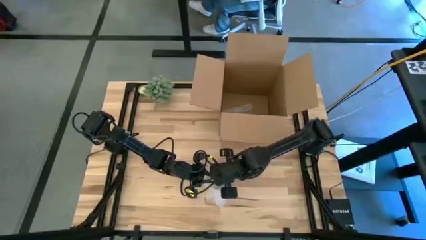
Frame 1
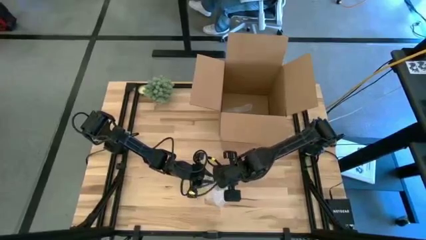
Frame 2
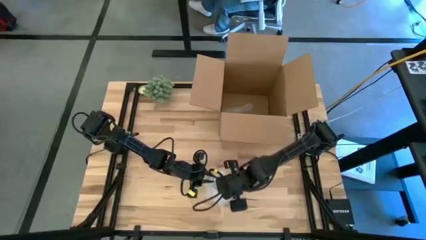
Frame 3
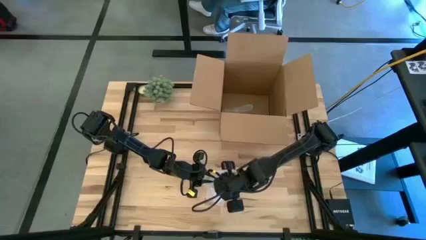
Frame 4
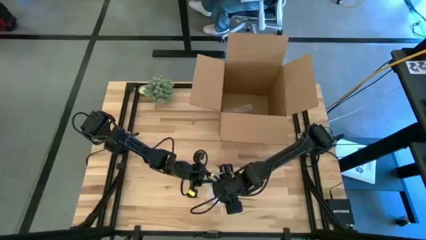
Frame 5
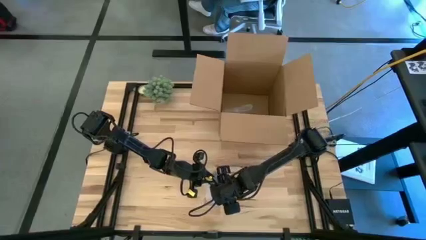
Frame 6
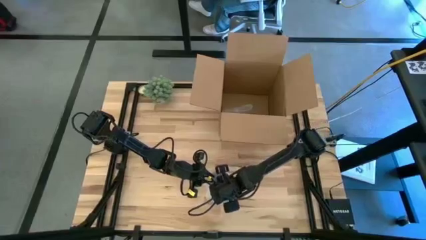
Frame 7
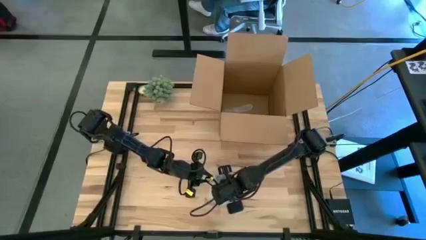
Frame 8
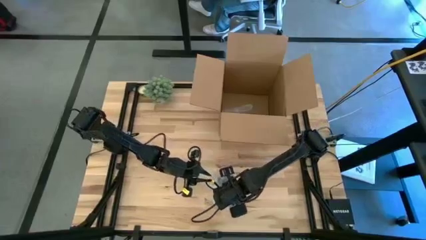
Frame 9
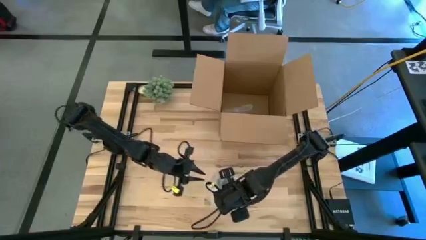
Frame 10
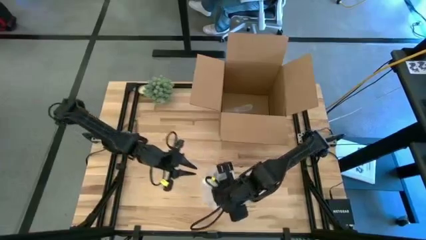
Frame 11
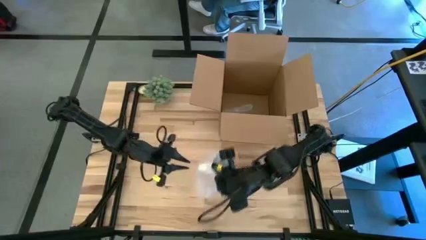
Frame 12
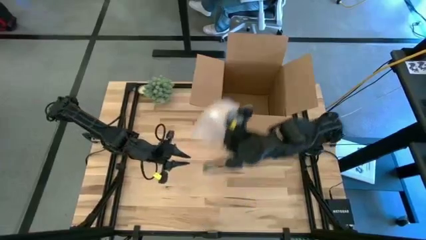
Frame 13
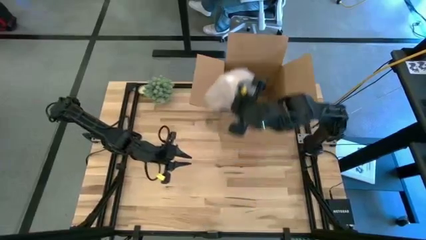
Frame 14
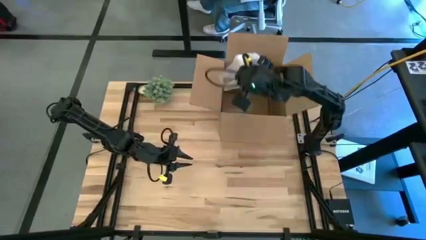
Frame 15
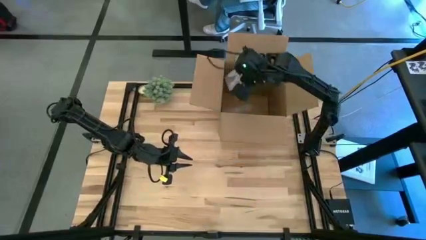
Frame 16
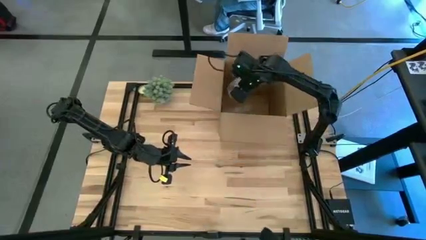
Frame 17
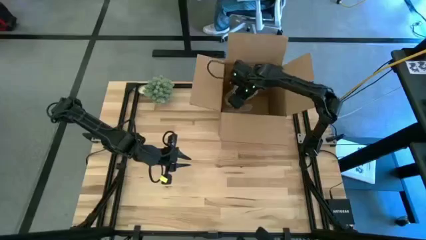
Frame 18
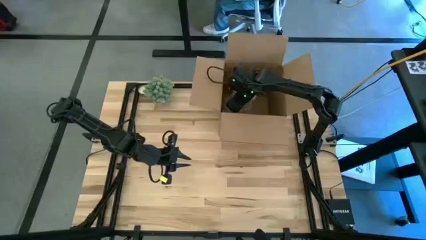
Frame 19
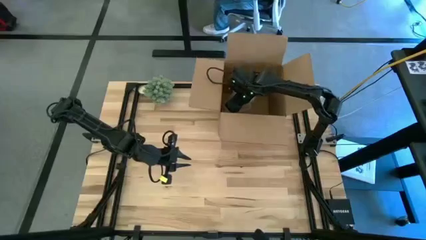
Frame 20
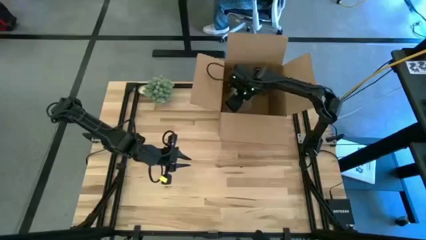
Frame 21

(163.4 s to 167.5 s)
Task: wrap mug
Put the wrapped orange patterned mug into the cardboard box

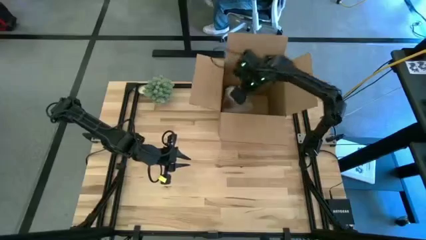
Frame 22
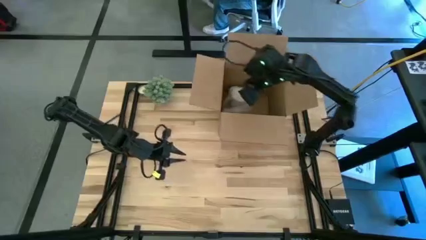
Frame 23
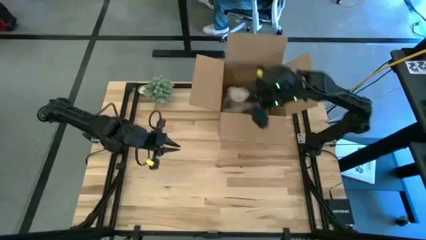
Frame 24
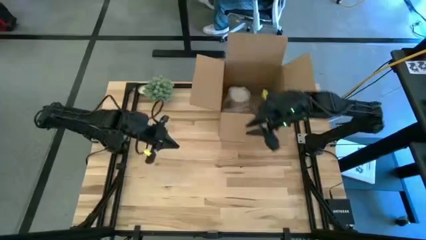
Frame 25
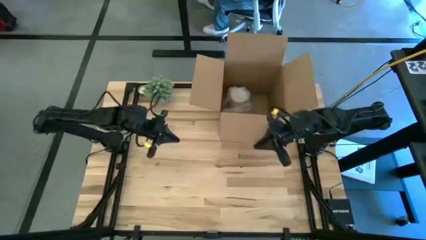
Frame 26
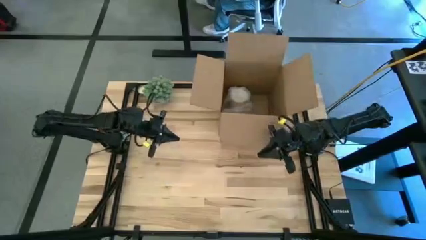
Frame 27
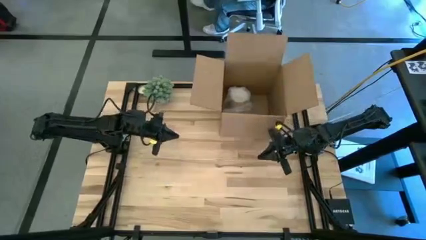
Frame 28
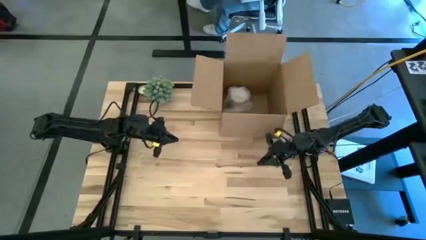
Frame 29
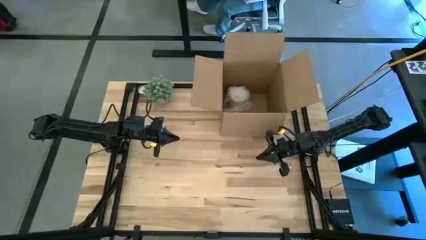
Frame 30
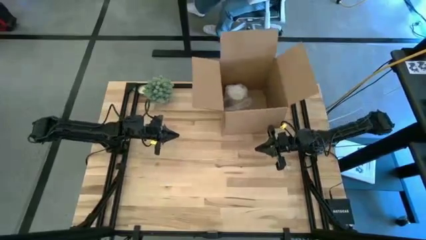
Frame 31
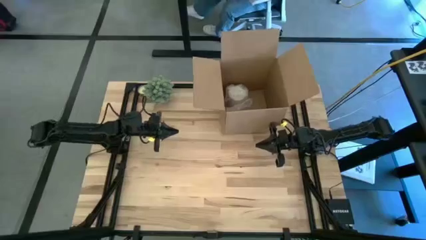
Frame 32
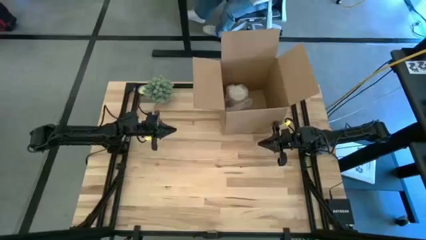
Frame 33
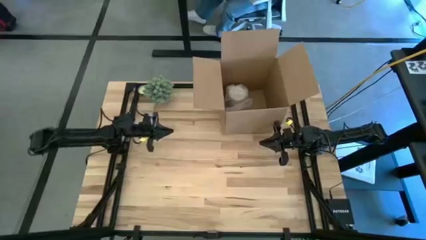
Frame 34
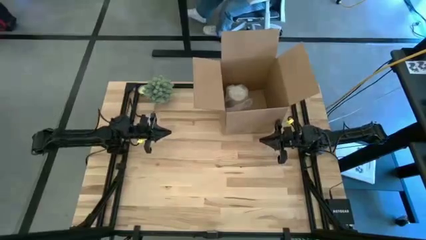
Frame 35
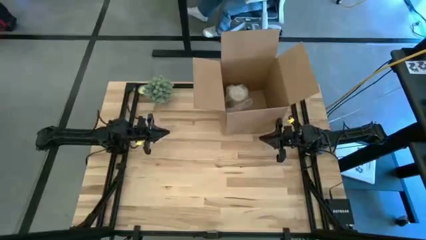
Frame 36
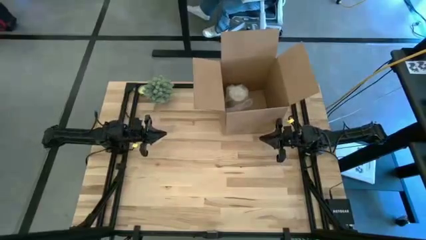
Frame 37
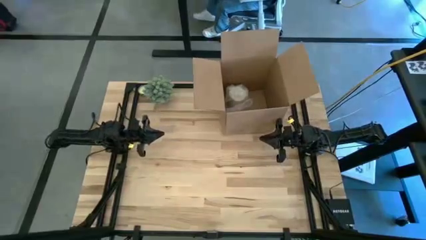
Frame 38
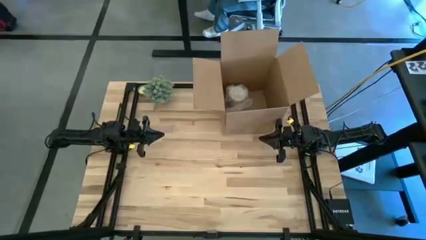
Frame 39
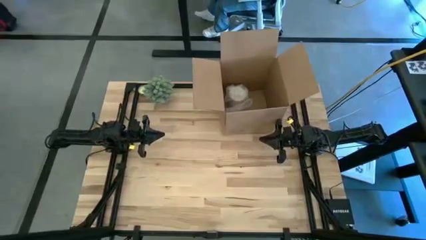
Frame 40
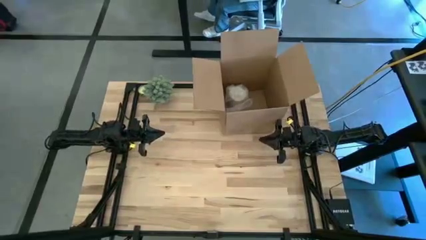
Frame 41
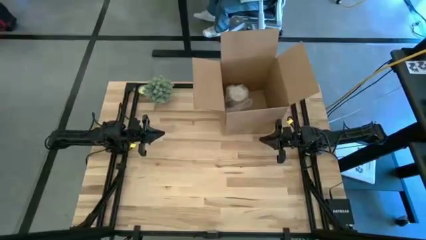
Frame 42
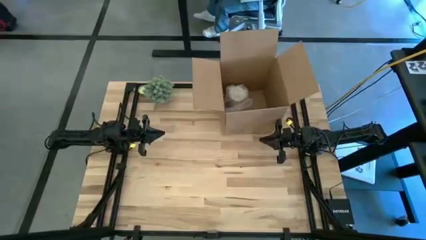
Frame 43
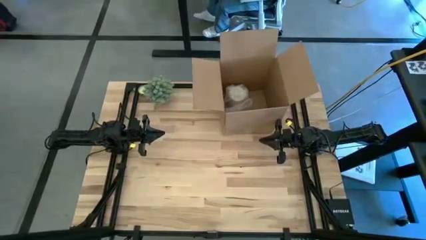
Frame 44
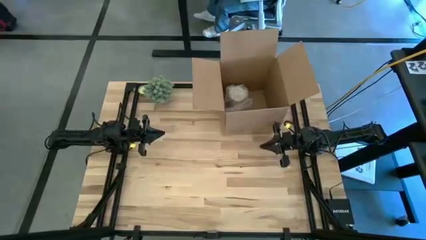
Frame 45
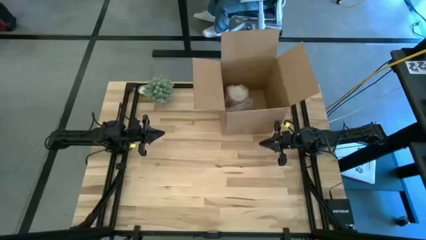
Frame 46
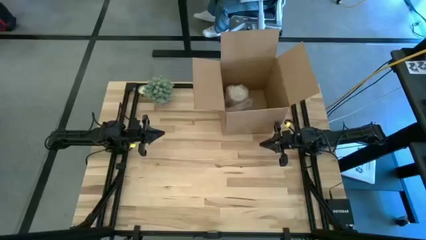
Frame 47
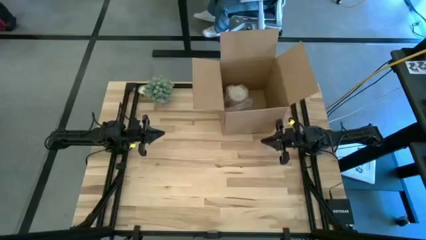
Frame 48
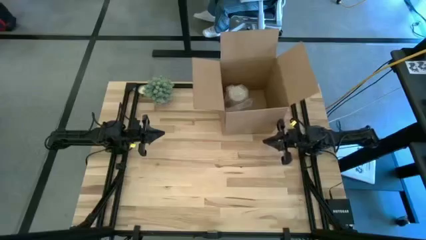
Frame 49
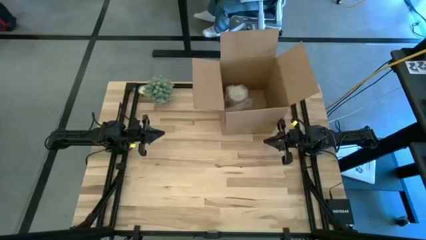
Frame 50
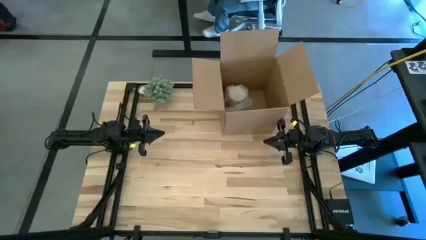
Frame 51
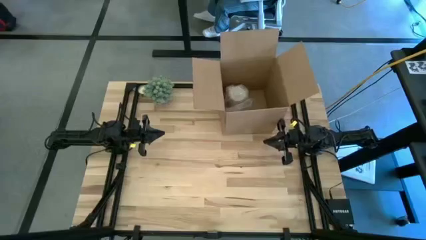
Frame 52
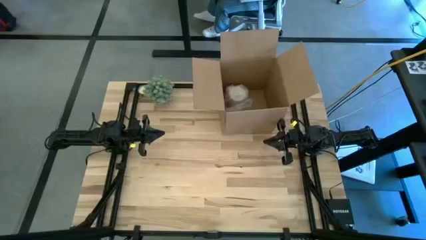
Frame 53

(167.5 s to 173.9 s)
Return to Home Position

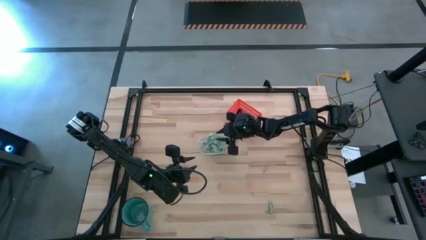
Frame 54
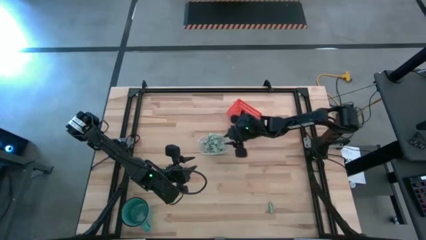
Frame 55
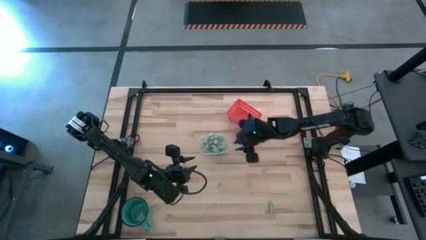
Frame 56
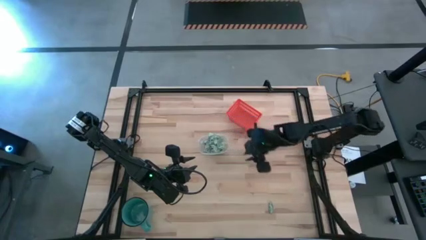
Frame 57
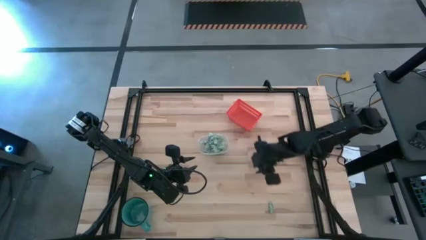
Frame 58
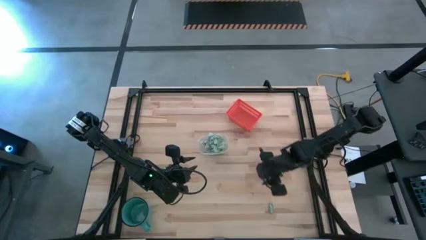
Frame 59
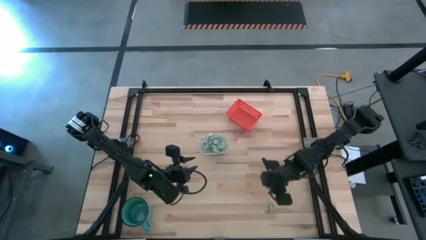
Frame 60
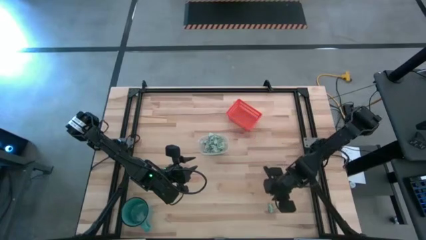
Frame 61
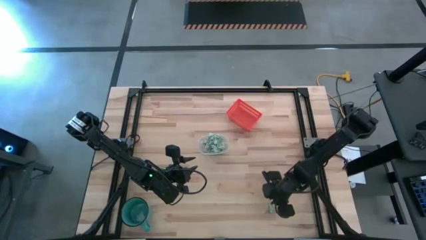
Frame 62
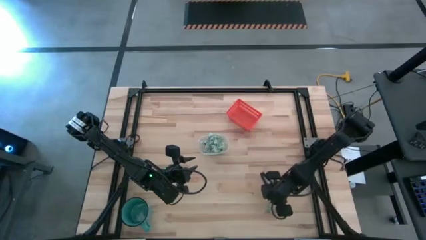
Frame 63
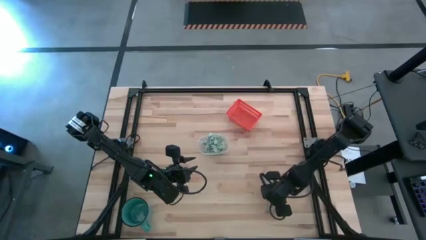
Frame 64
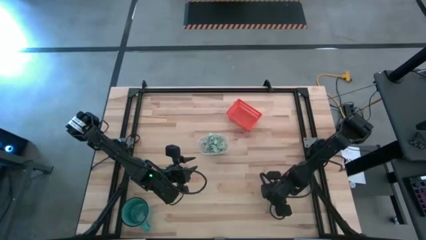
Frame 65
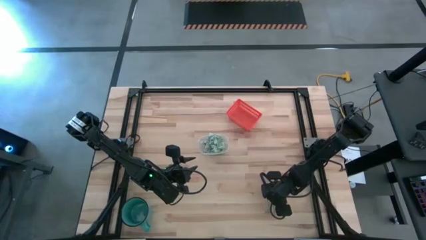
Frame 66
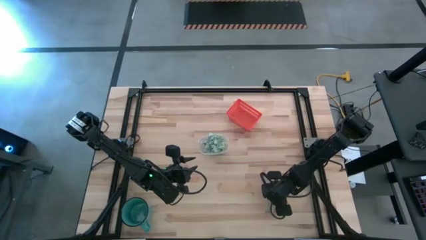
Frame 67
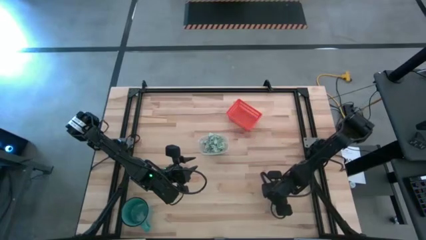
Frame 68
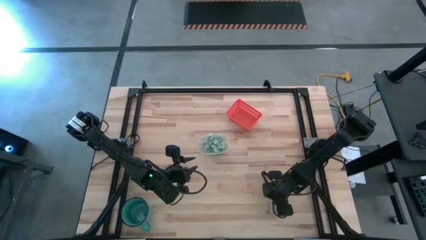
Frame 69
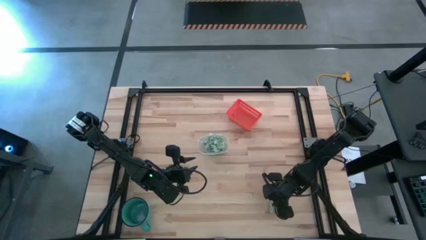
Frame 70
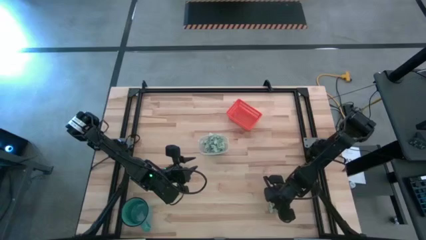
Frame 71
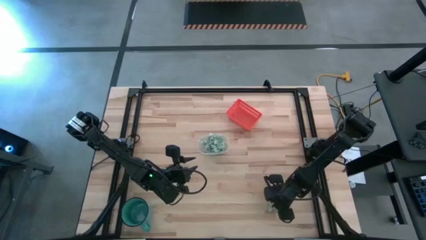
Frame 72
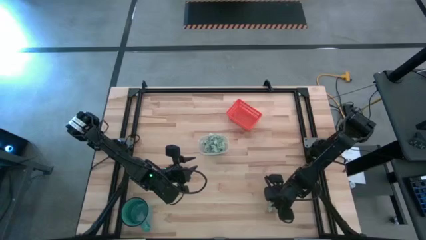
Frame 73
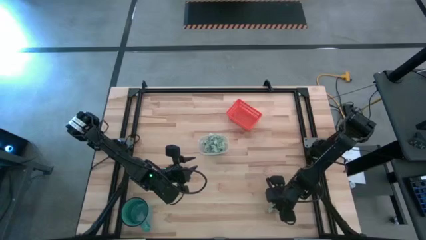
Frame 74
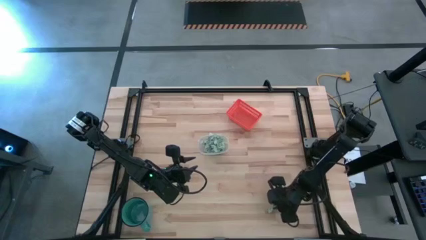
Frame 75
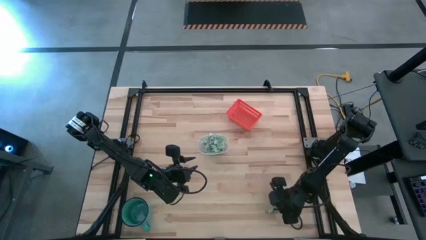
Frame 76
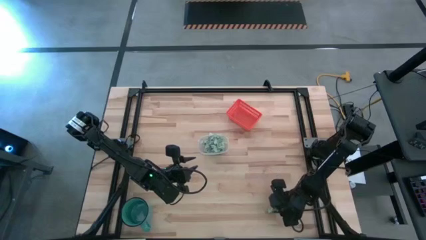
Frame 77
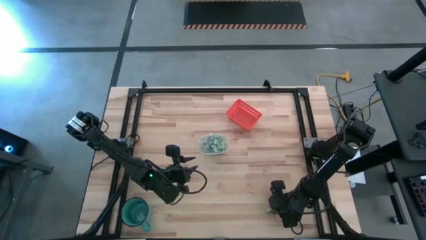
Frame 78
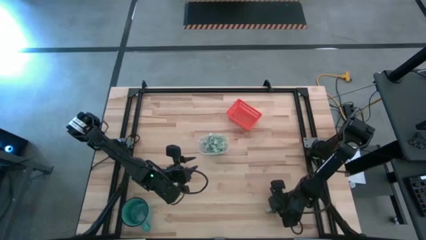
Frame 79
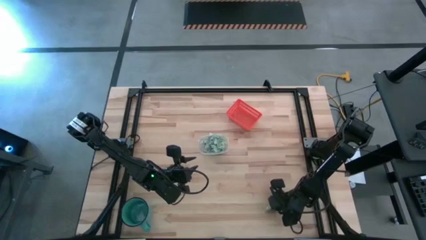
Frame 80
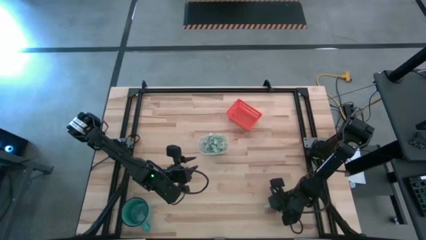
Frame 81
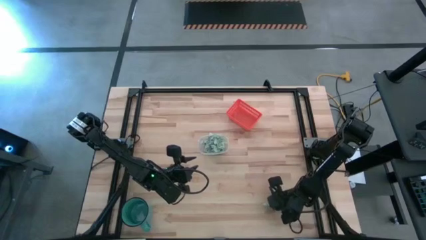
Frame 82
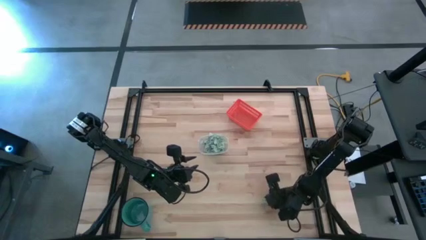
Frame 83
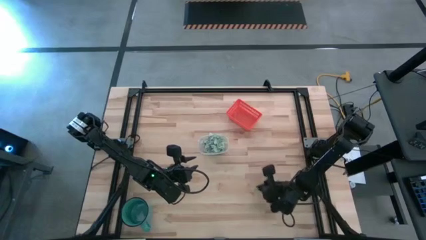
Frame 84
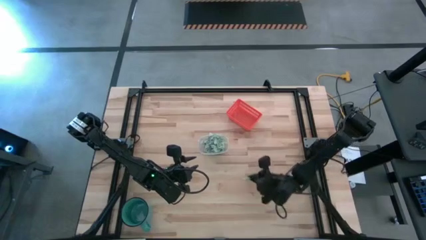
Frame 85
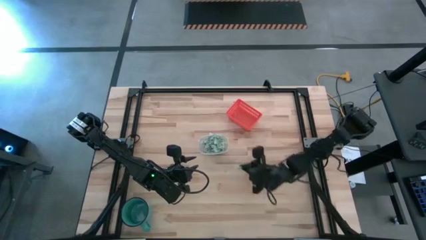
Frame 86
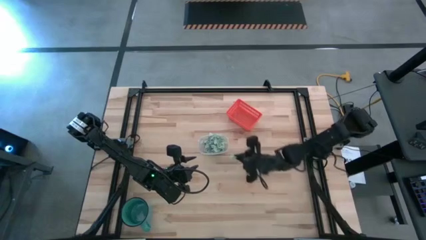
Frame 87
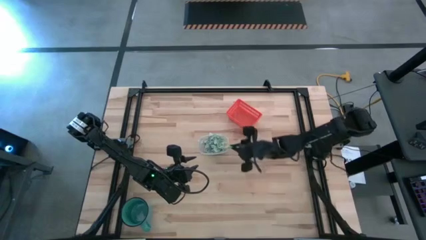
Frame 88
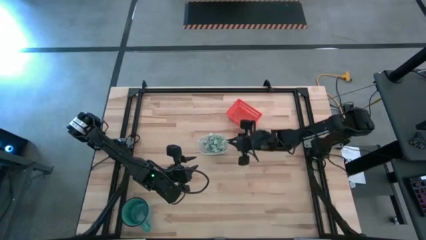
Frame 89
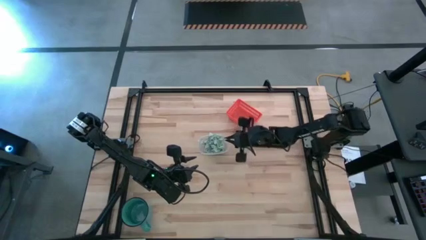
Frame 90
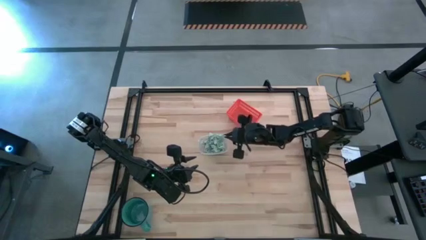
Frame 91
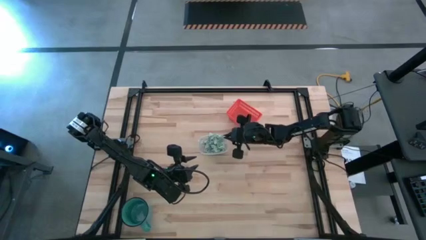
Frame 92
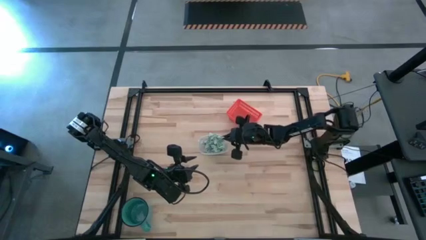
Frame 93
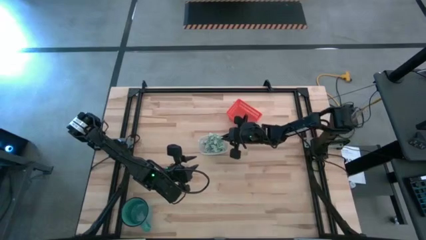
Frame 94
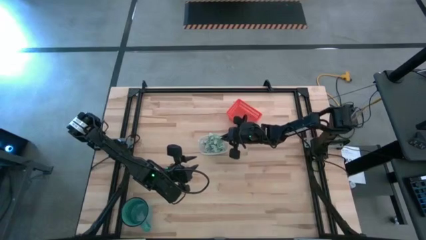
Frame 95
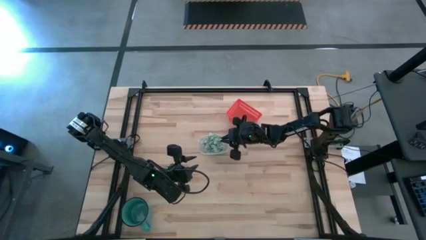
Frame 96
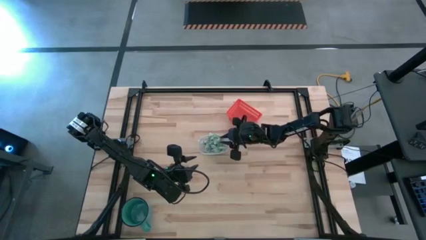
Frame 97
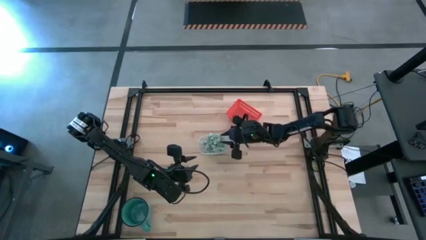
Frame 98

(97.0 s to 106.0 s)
Task: Pick and place items into bin
Put the stevia packet into the transparent bin
